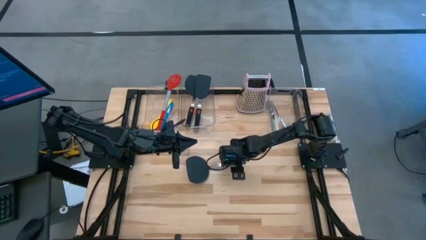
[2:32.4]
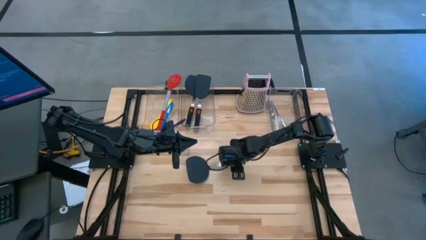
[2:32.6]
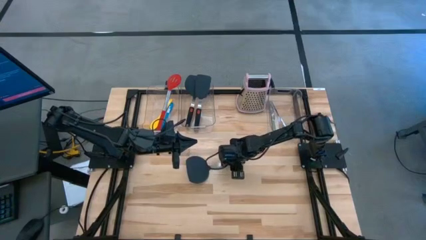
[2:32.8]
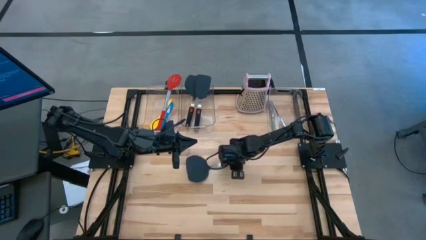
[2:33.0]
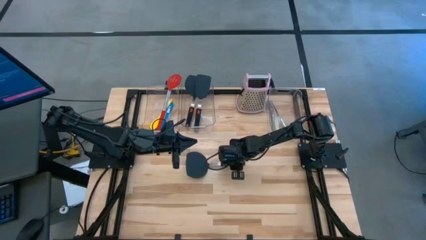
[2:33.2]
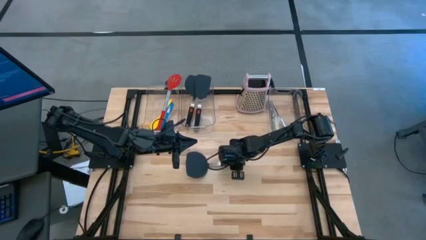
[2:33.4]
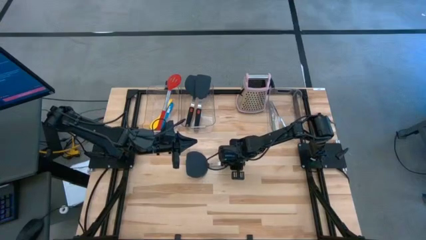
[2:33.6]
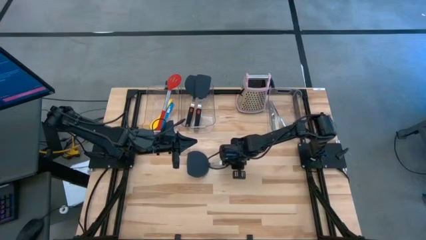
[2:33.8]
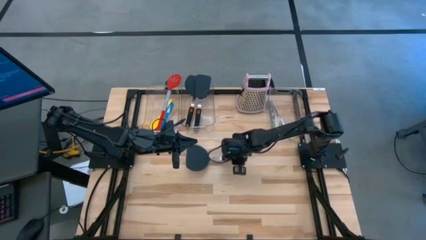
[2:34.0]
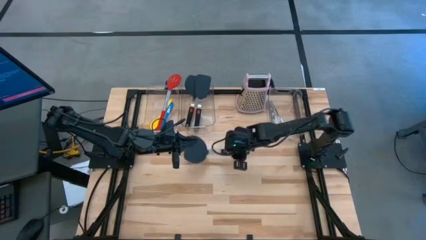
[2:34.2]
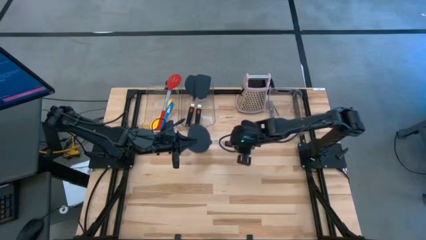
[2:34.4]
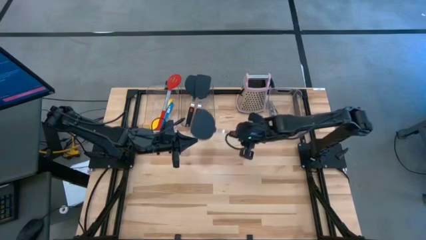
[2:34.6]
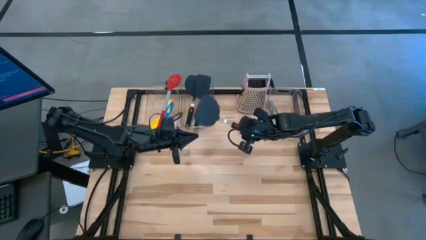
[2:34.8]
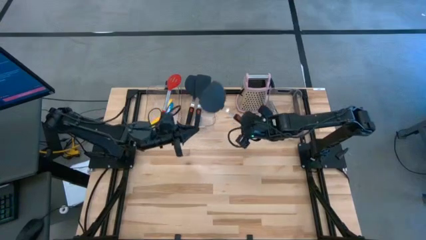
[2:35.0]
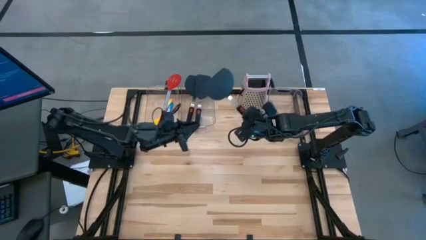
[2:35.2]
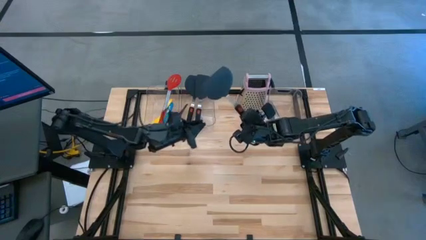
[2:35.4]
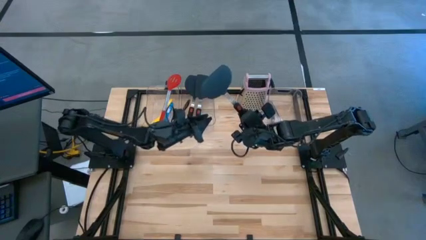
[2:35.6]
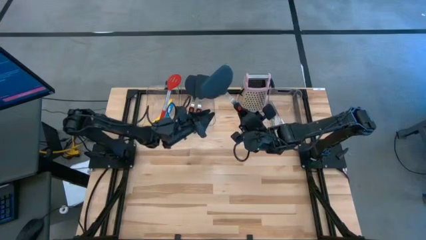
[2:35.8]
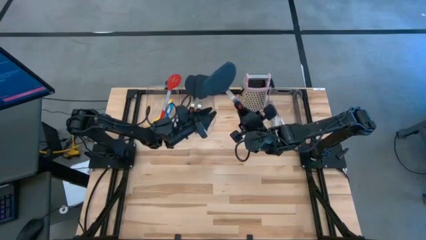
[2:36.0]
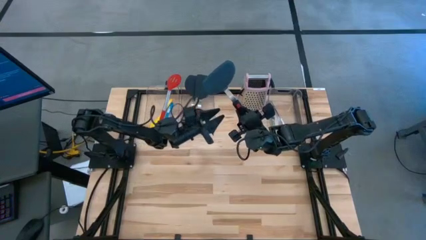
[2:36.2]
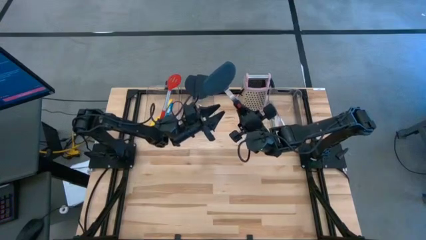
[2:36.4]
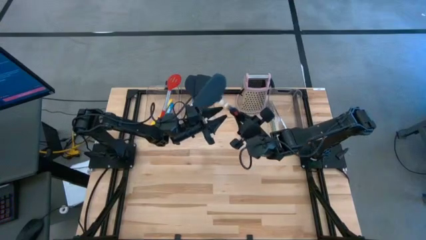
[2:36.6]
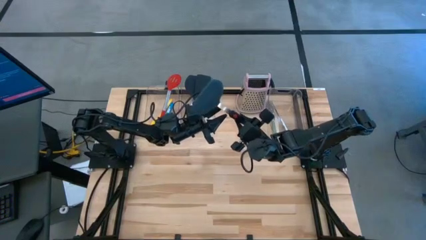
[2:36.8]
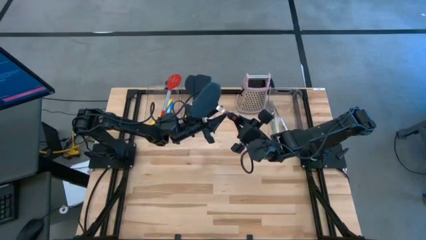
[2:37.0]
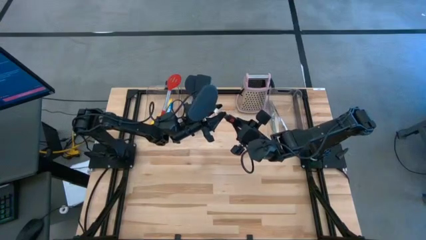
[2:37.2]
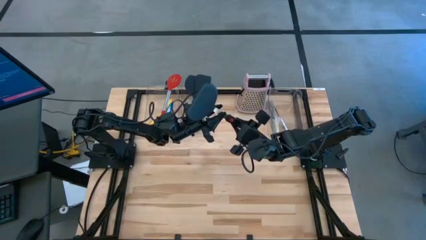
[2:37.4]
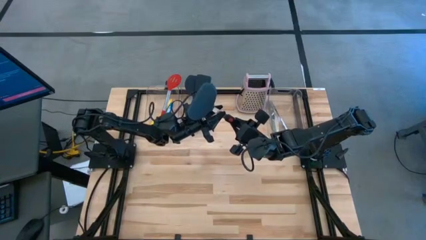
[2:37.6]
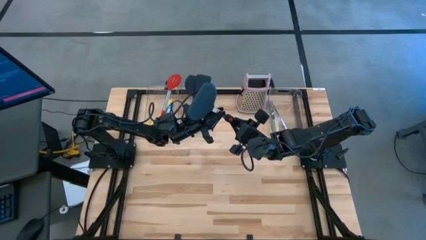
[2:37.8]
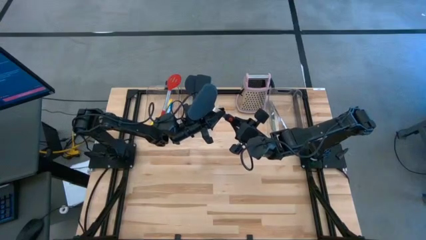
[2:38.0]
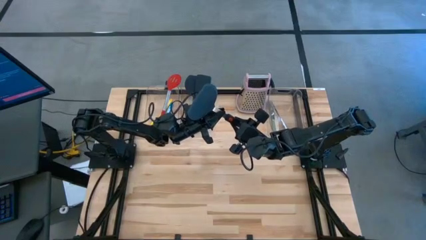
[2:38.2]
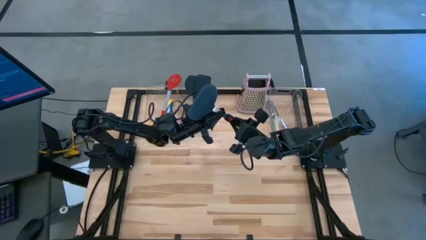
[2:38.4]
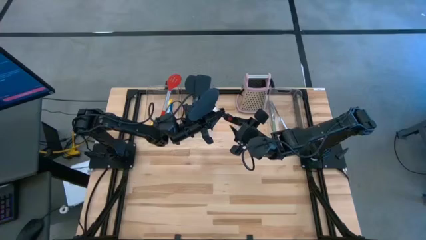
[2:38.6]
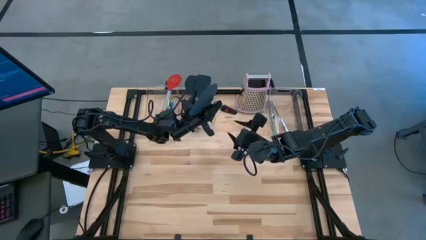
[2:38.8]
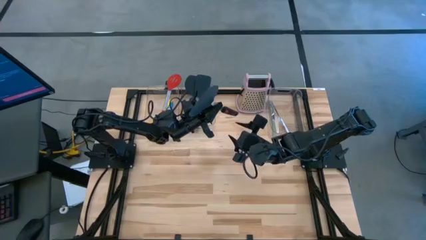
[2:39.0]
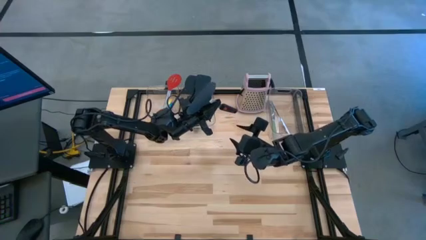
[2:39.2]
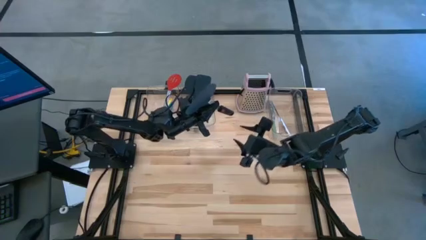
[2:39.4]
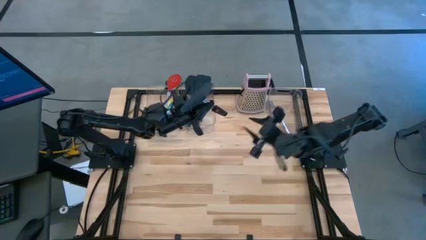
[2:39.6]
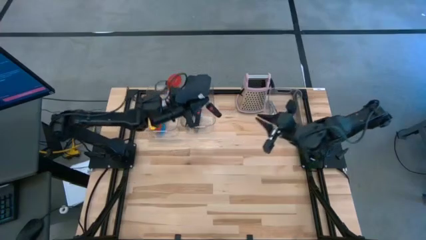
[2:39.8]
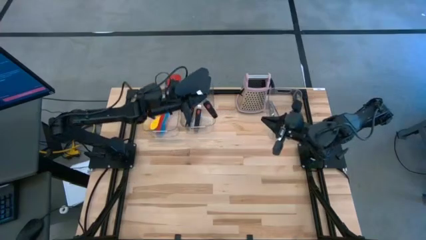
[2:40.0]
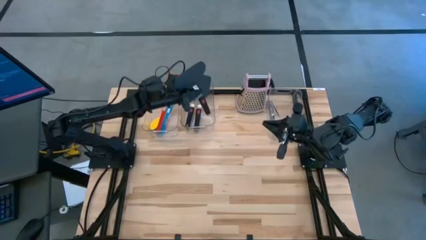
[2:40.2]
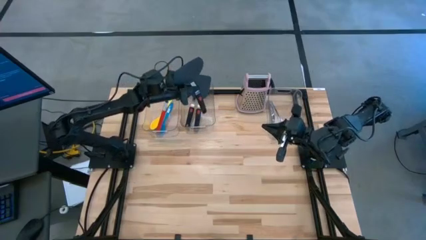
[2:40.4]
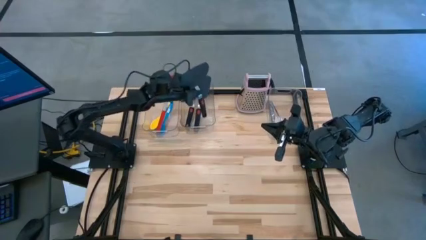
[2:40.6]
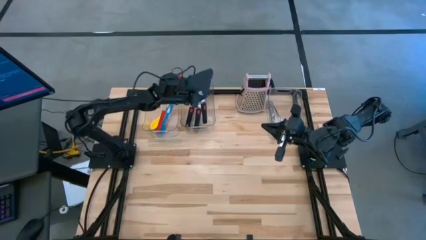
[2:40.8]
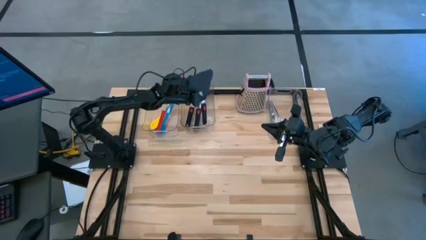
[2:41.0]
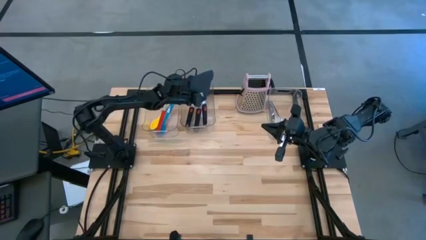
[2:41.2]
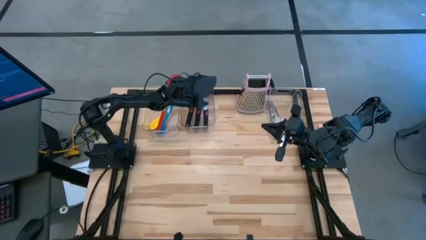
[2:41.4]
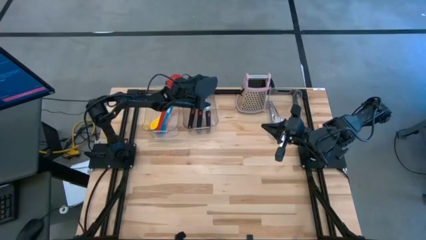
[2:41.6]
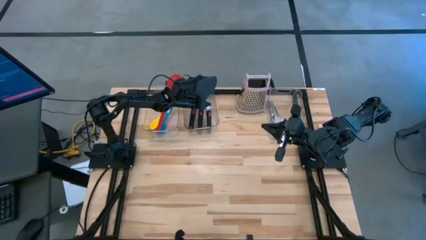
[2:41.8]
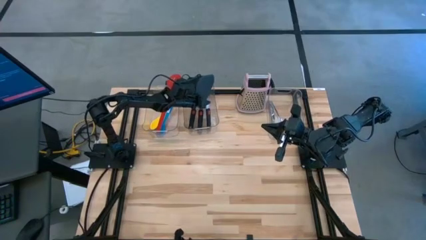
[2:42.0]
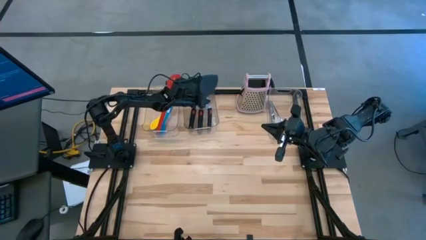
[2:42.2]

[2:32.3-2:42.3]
Task: Pick & Place Kitchen Items
Put the black spatula into the middle transparent bin

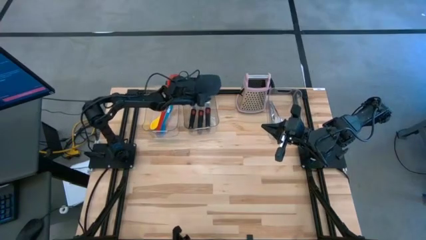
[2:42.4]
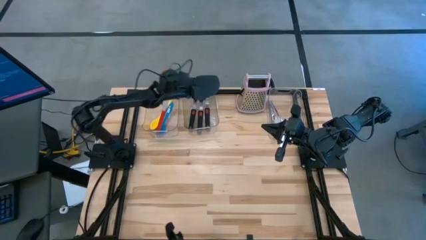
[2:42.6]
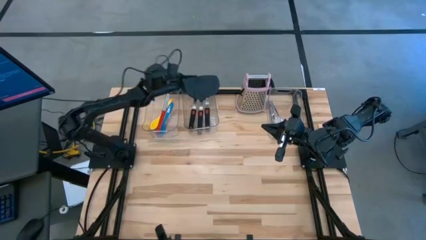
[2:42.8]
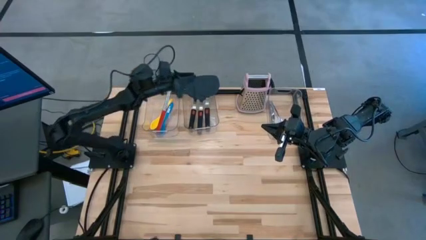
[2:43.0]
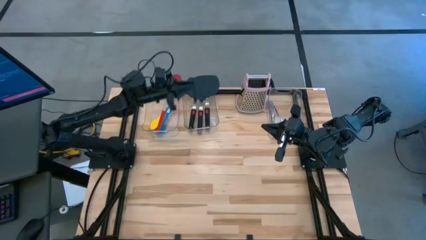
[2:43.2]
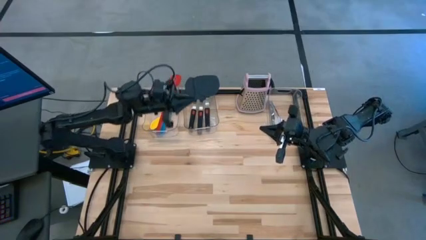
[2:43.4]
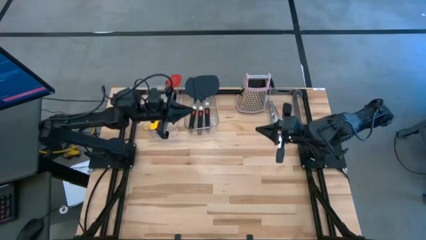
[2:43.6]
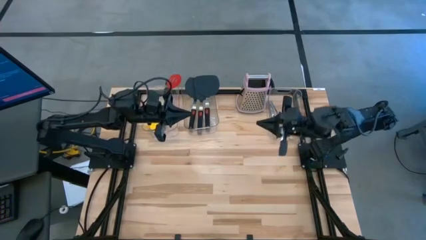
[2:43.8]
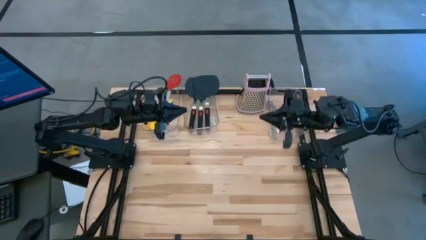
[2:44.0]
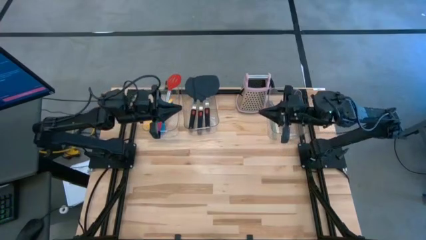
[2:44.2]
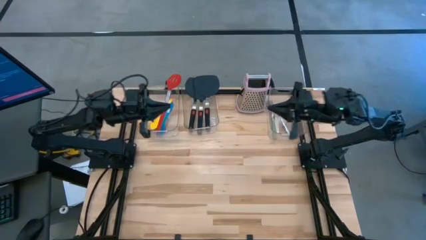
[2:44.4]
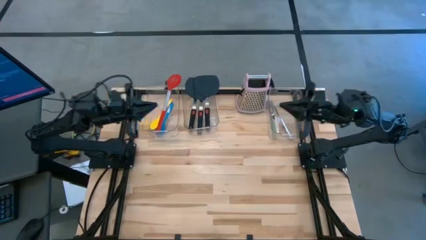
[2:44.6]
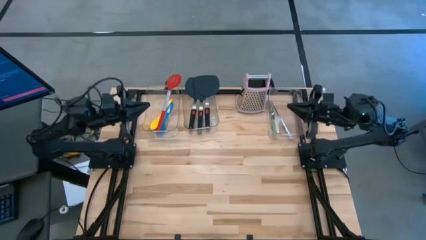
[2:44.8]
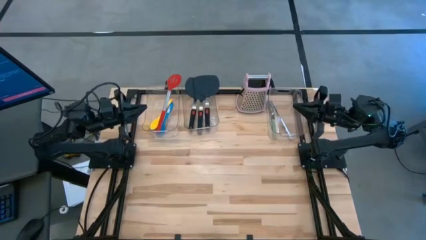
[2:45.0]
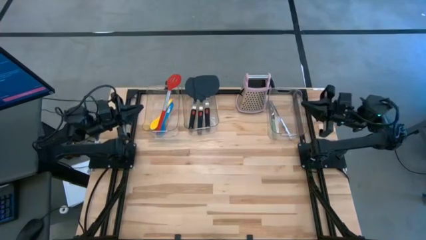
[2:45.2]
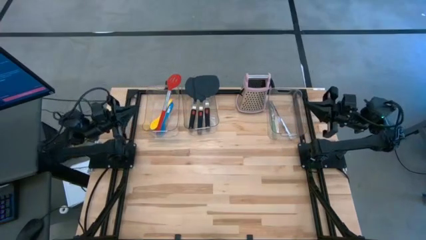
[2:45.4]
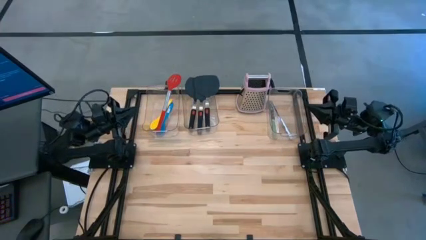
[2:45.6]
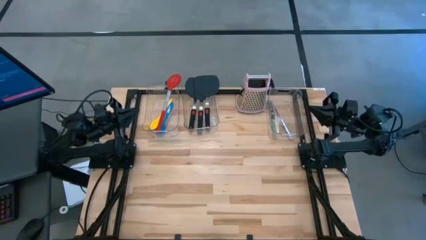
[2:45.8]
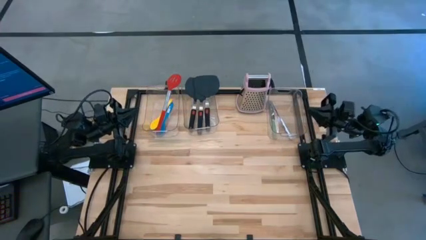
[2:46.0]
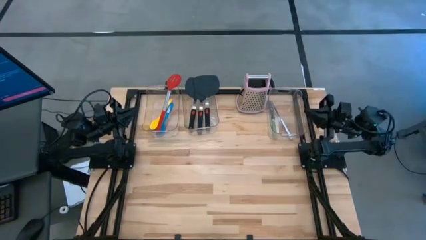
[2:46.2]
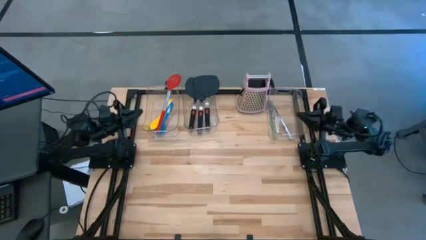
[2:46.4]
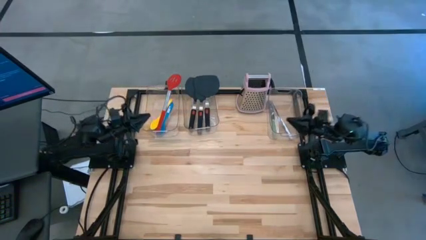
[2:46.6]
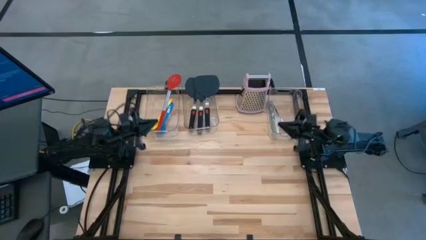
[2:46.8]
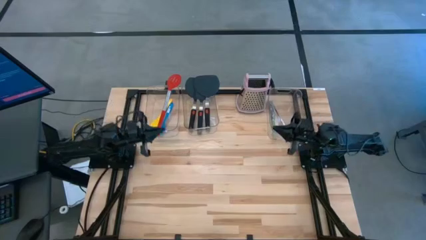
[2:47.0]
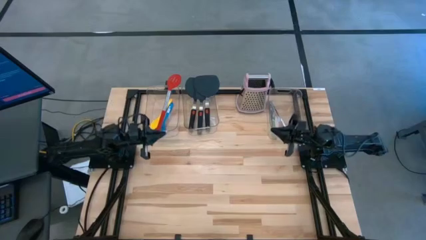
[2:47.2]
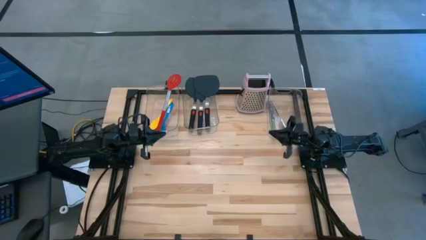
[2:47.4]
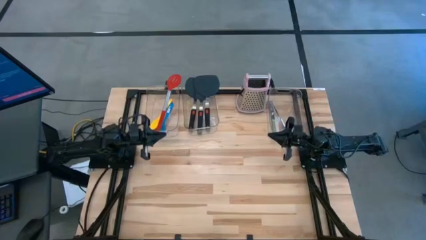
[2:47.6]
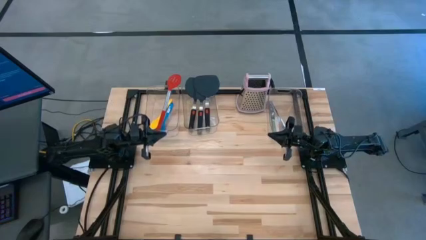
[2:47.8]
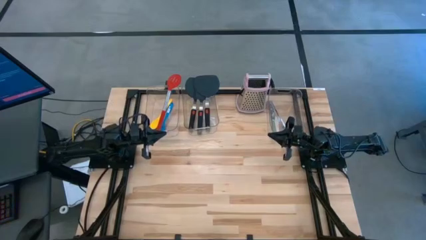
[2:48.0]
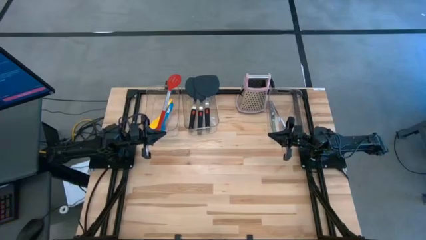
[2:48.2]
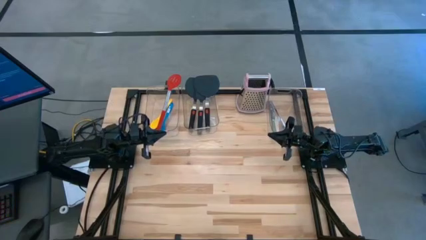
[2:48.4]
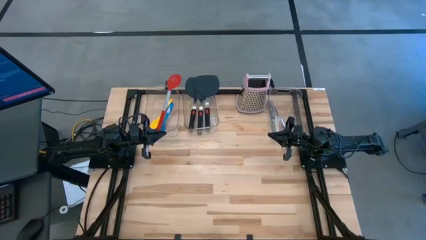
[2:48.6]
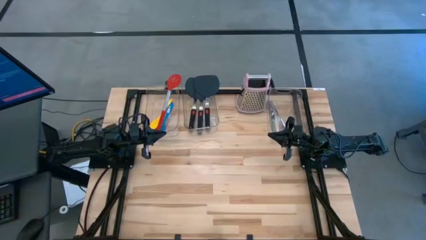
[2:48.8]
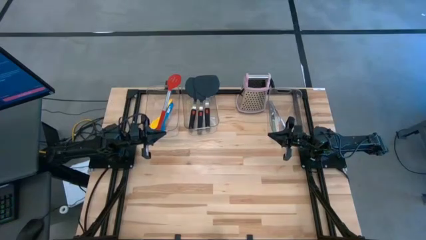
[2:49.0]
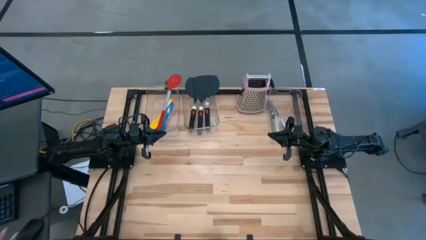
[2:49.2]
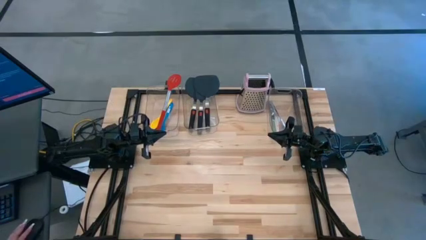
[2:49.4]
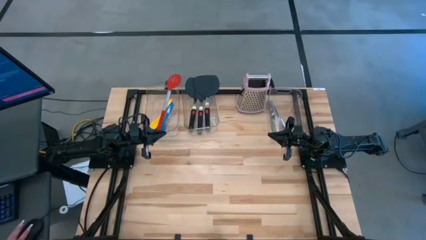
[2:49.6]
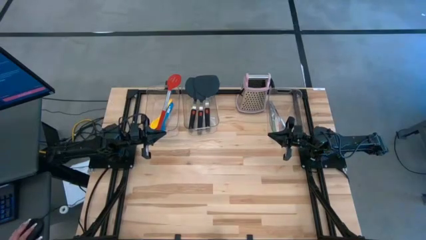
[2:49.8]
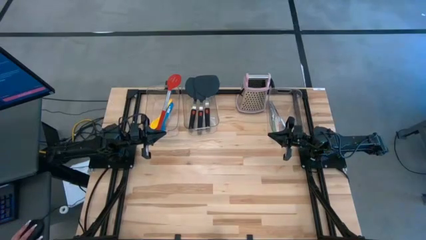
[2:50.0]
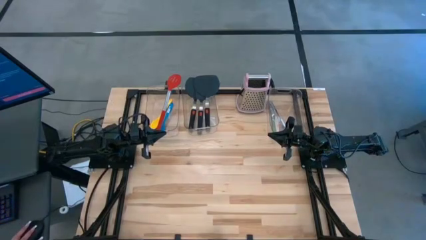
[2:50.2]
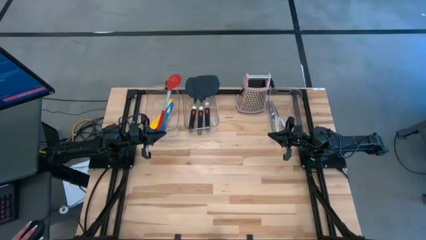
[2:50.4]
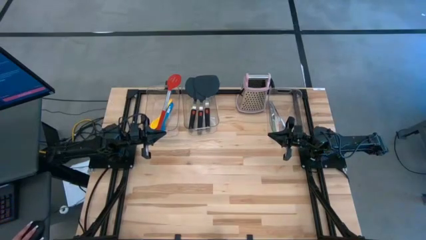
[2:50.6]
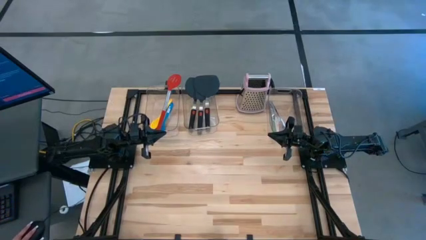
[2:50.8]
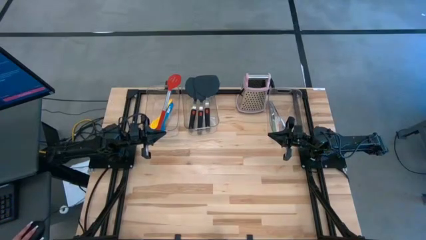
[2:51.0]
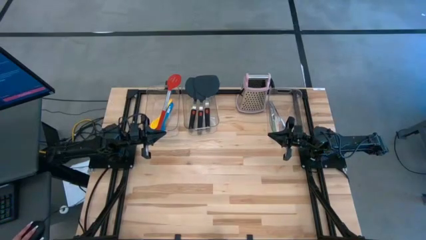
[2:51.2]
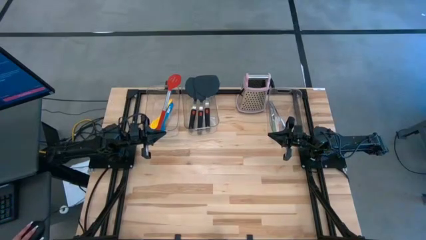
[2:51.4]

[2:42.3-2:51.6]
Return to Home Position
